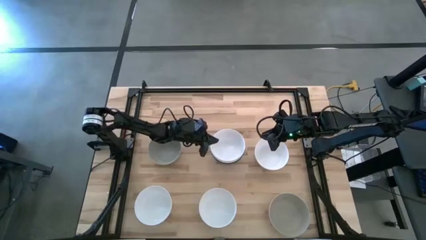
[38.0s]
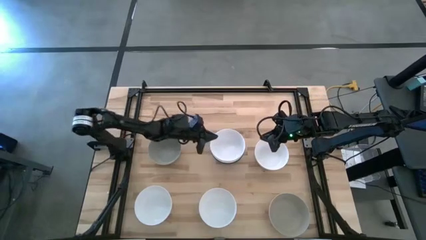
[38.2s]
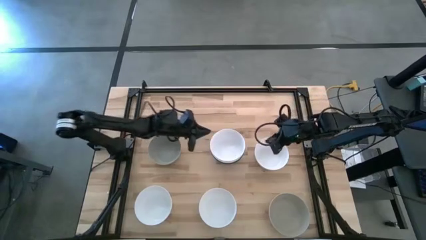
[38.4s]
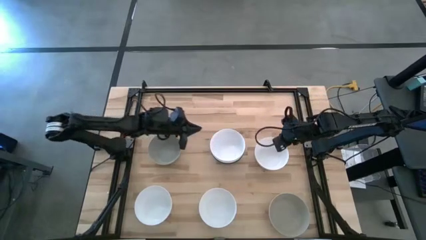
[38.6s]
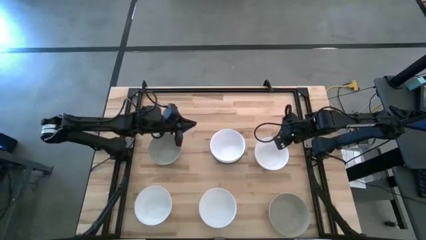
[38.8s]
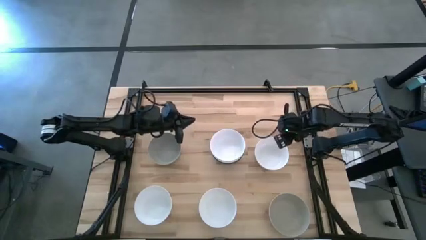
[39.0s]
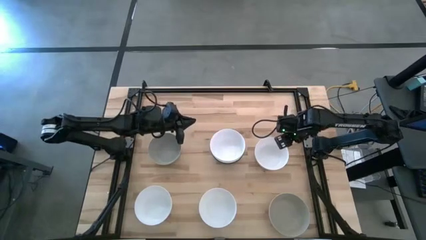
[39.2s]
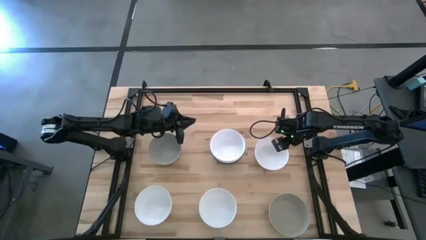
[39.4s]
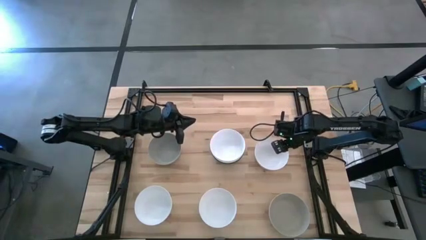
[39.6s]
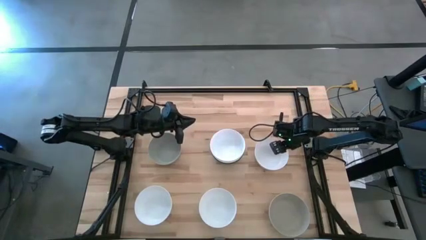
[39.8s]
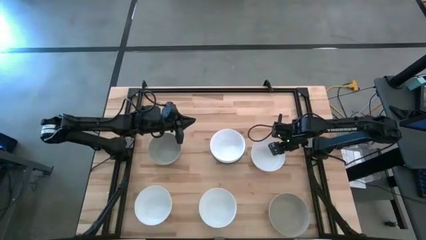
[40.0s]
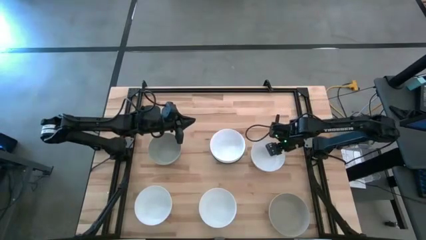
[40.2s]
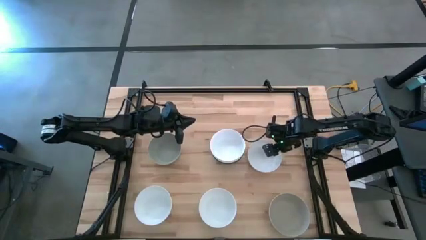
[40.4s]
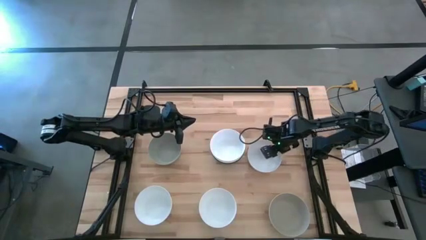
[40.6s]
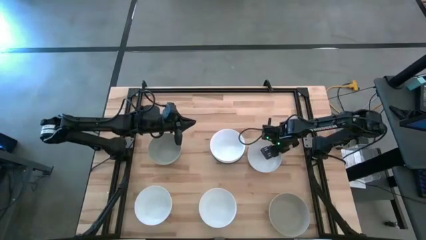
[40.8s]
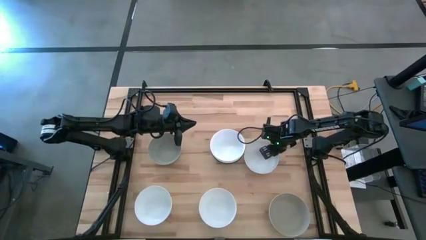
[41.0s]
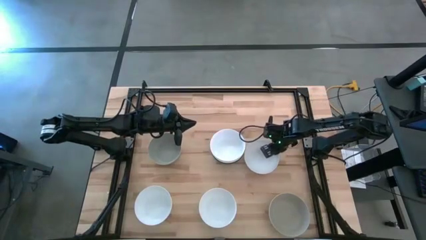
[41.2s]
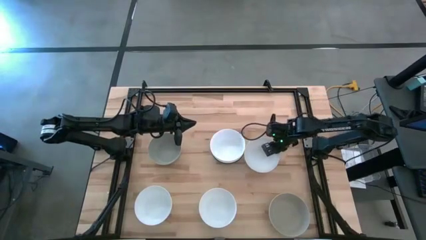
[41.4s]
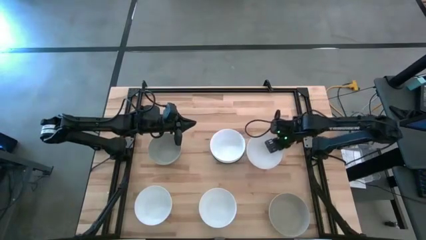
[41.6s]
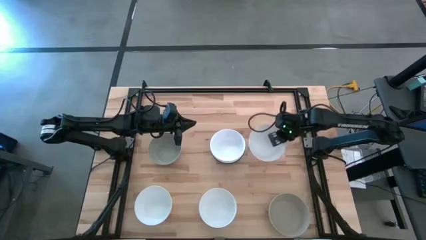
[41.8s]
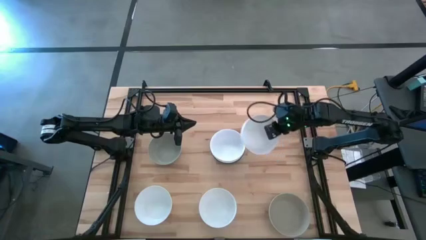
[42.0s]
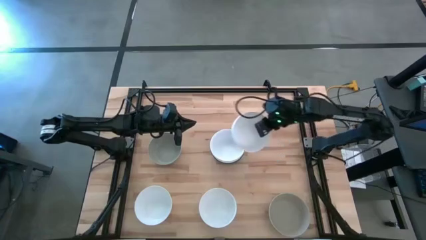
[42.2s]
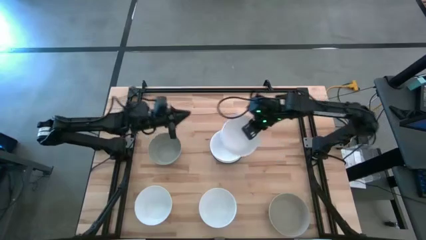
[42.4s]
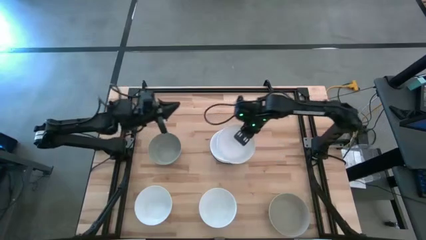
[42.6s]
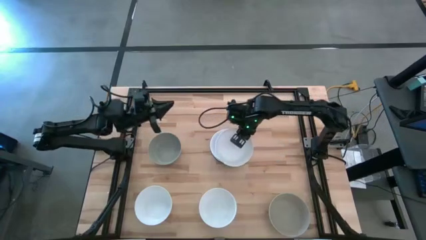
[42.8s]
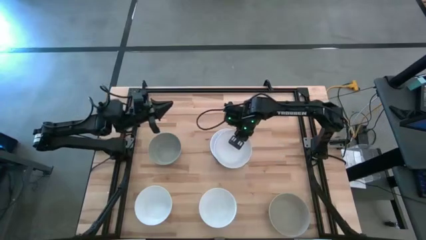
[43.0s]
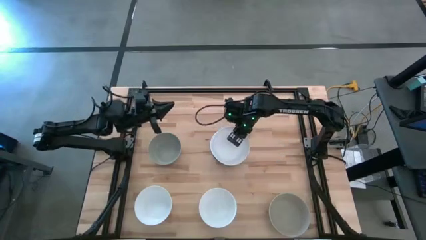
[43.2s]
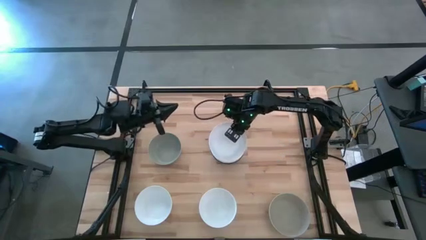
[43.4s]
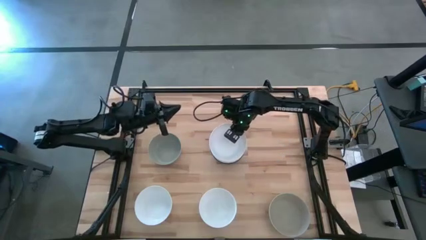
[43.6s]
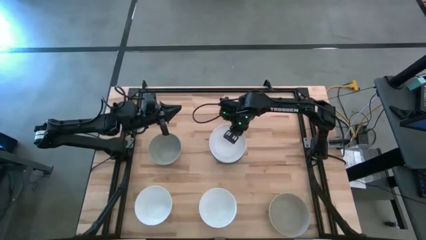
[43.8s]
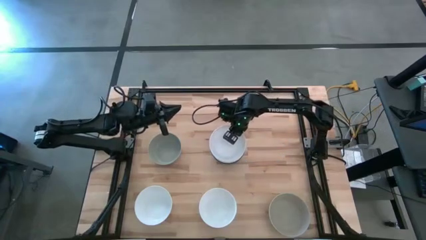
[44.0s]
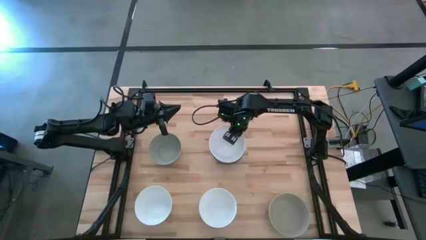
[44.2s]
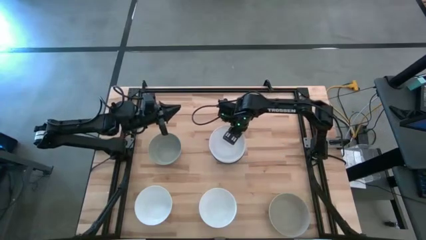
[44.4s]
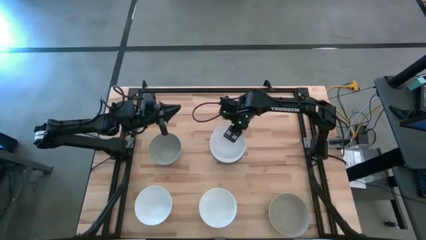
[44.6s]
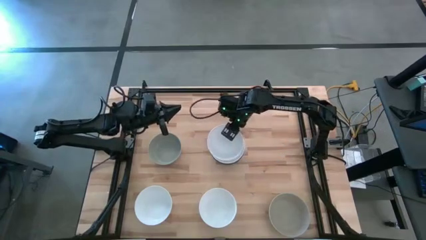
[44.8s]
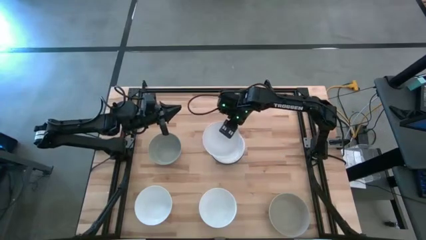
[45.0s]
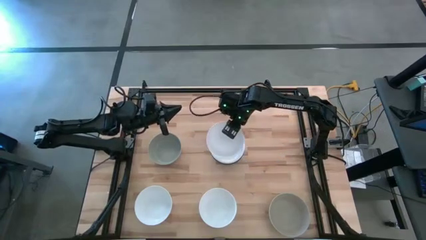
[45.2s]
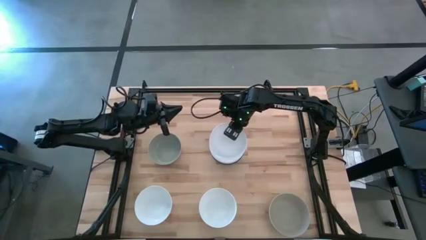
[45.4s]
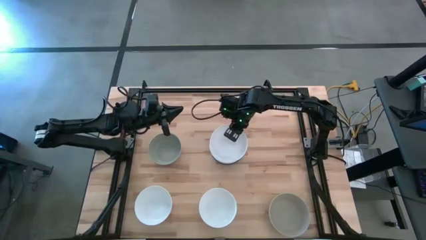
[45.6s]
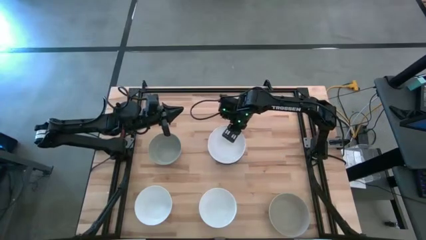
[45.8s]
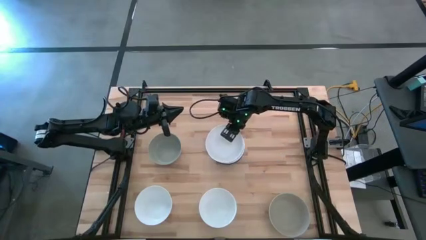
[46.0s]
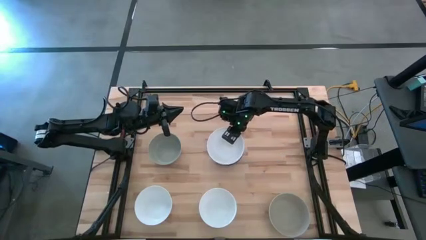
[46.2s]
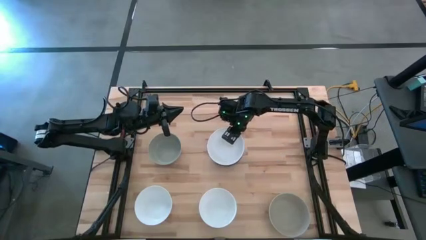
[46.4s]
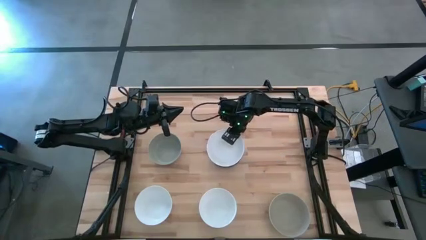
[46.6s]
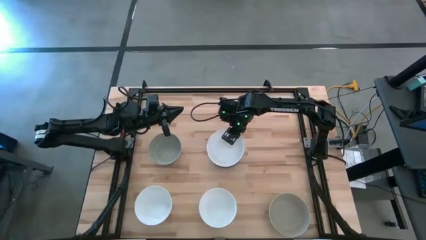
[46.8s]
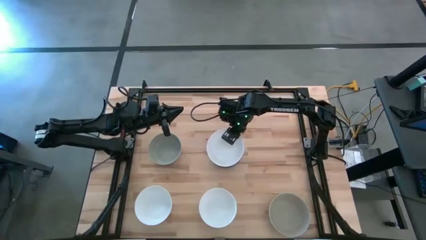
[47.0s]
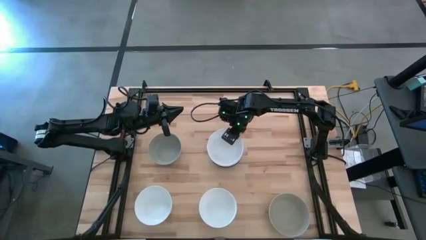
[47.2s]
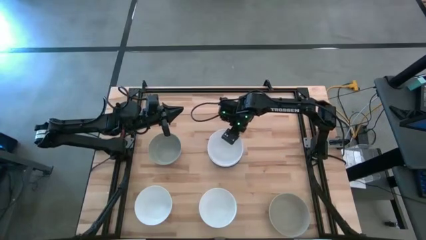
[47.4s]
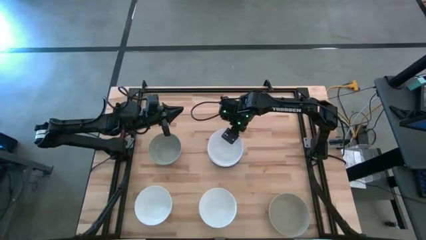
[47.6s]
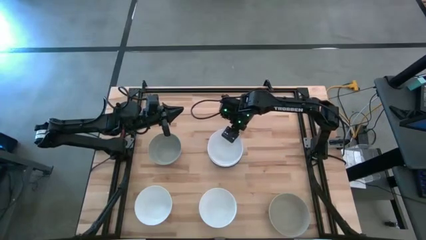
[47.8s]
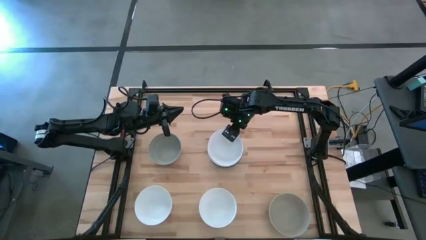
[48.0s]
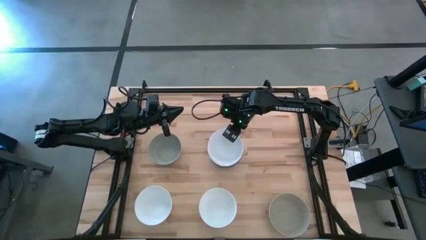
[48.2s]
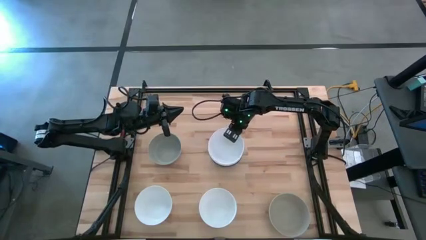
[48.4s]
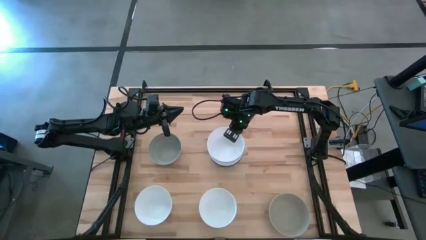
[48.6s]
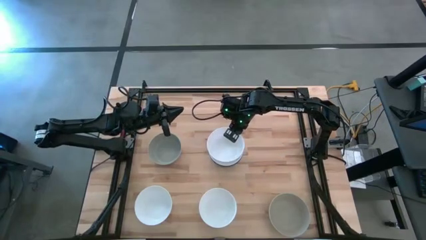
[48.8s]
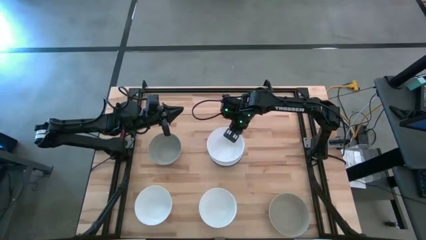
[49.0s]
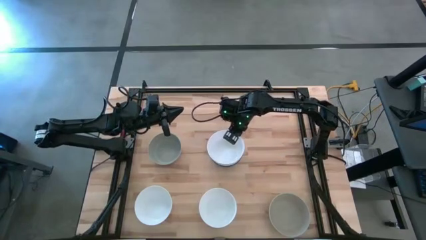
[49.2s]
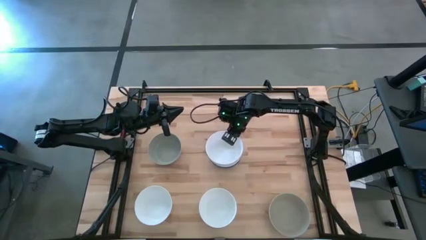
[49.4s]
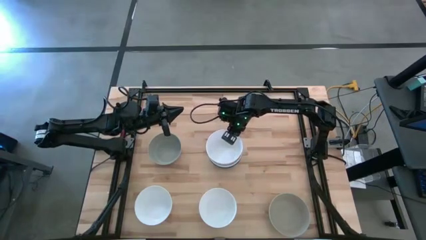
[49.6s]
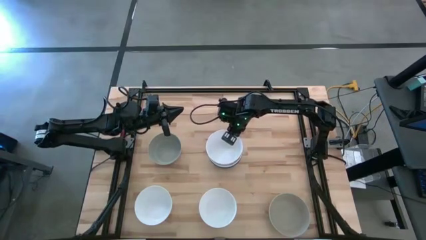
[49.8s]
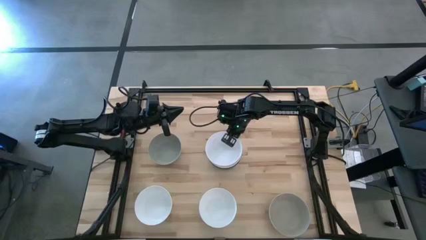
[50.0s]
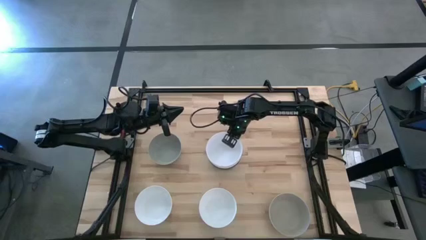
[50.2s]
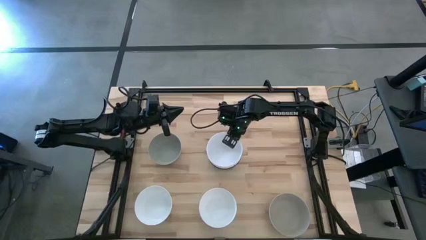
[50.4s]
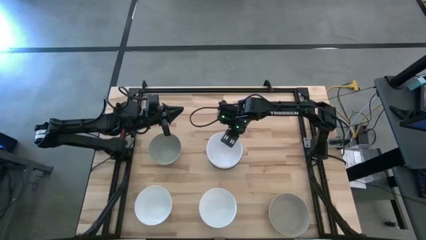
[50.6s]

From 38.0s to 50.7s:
Task: Nest bowls inside each other
Stack the white bowl on the other white bowl
